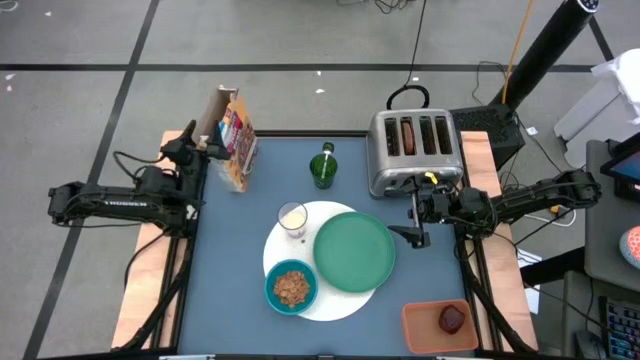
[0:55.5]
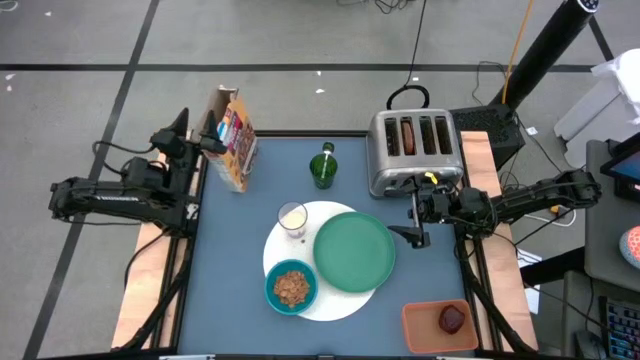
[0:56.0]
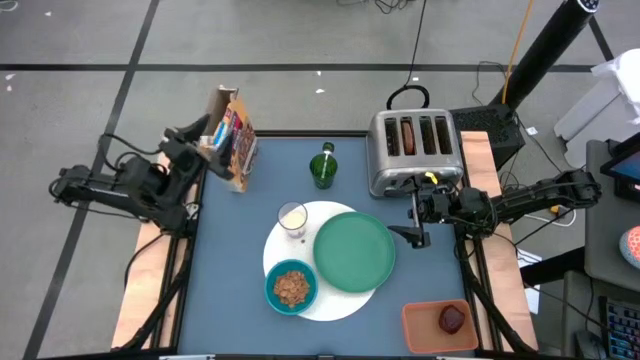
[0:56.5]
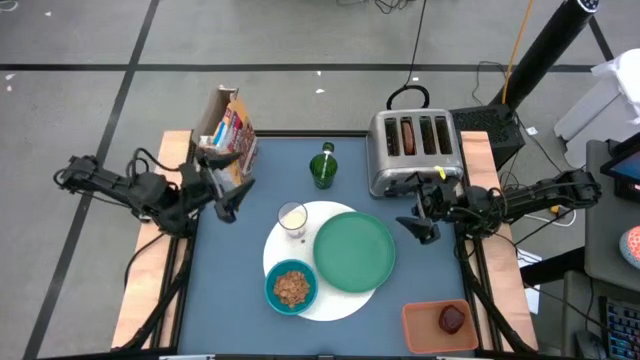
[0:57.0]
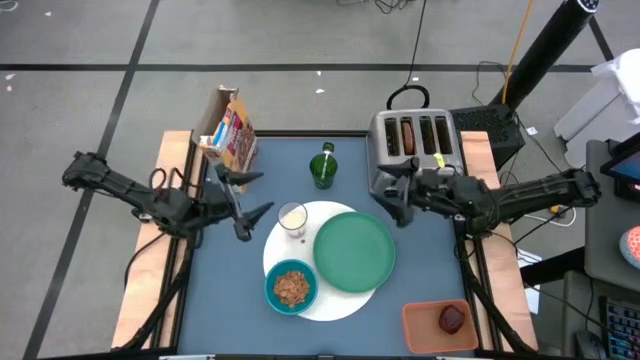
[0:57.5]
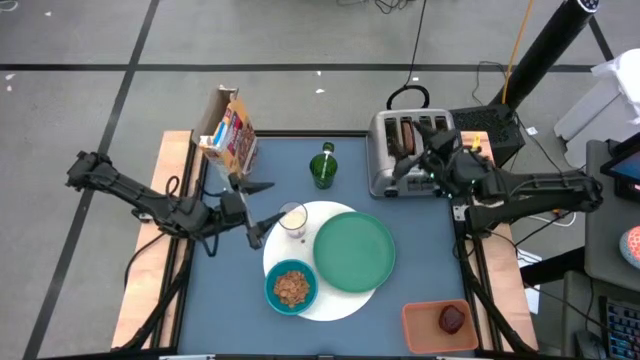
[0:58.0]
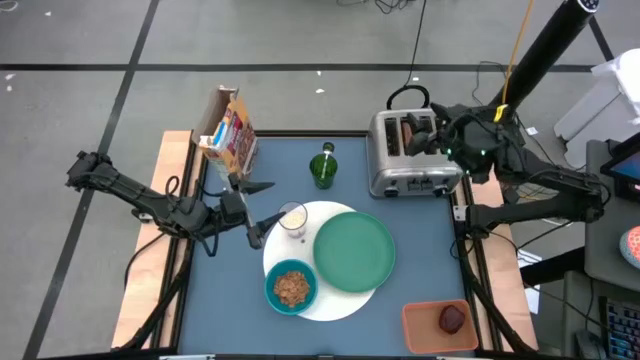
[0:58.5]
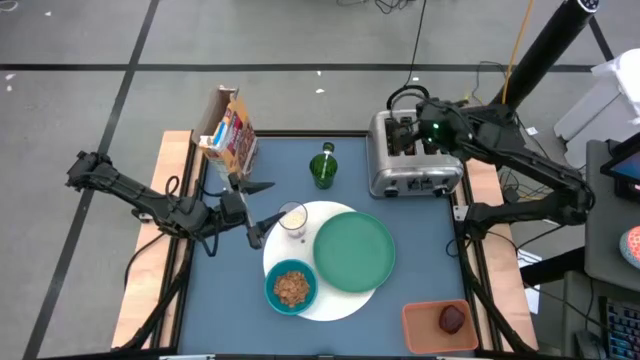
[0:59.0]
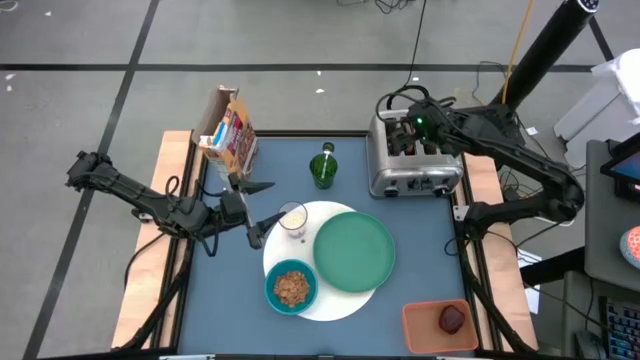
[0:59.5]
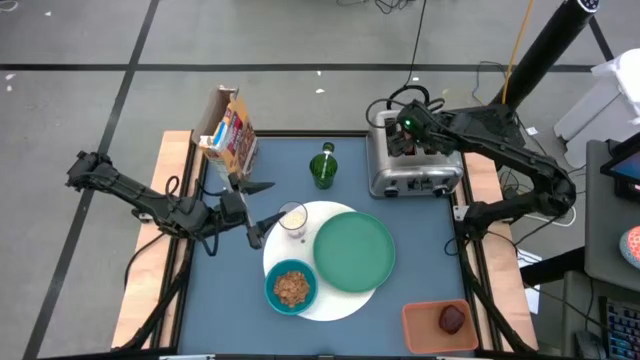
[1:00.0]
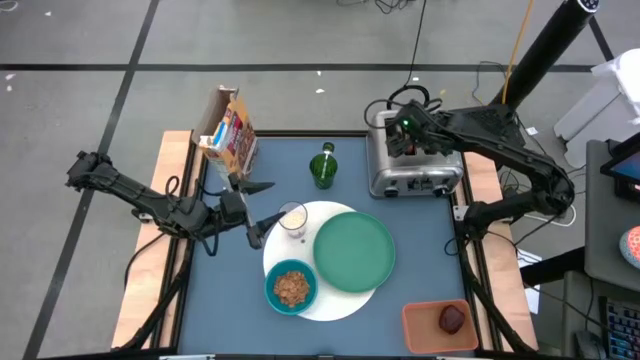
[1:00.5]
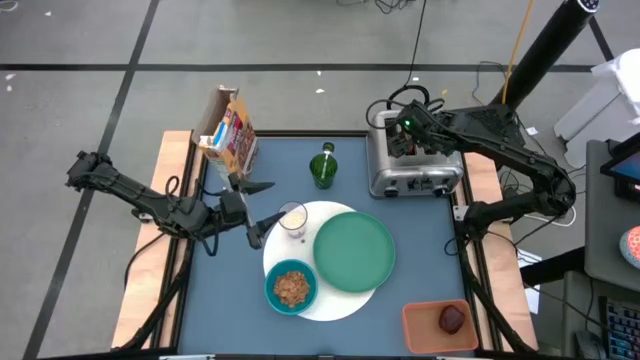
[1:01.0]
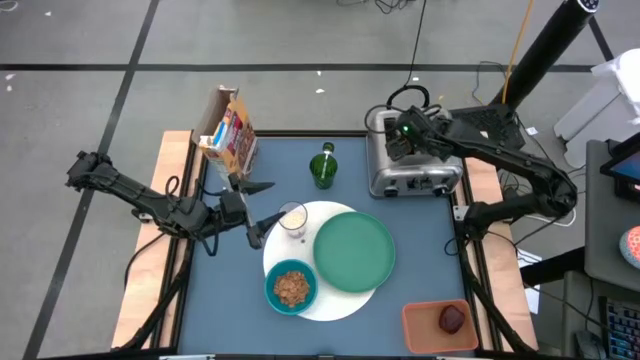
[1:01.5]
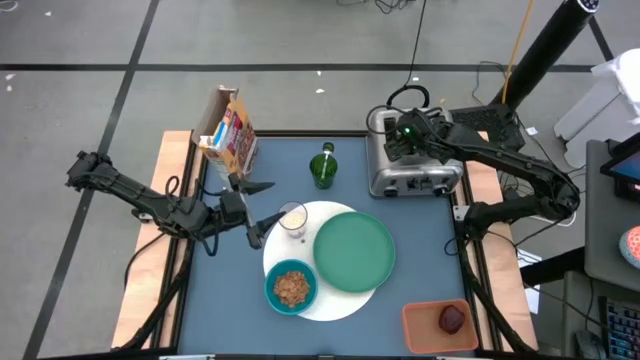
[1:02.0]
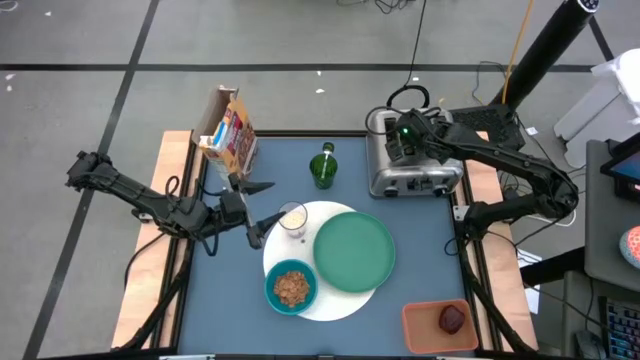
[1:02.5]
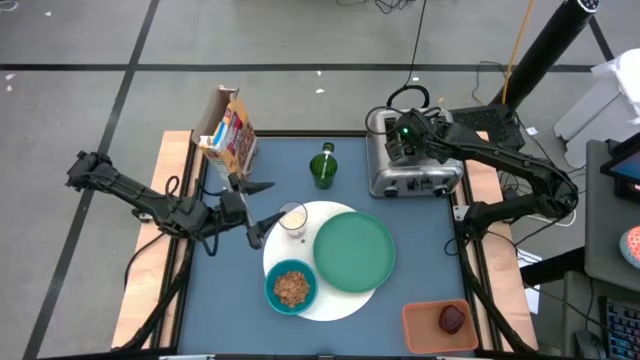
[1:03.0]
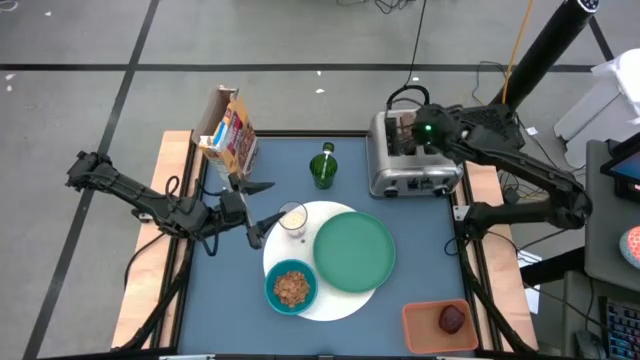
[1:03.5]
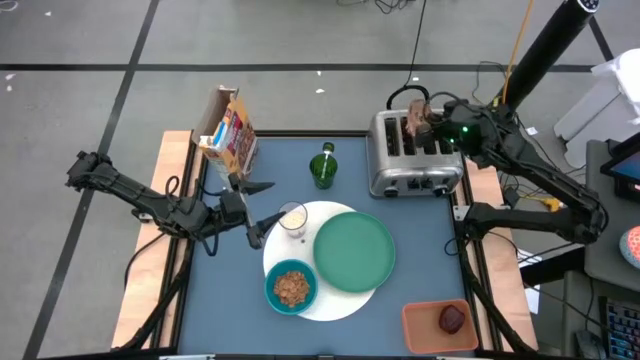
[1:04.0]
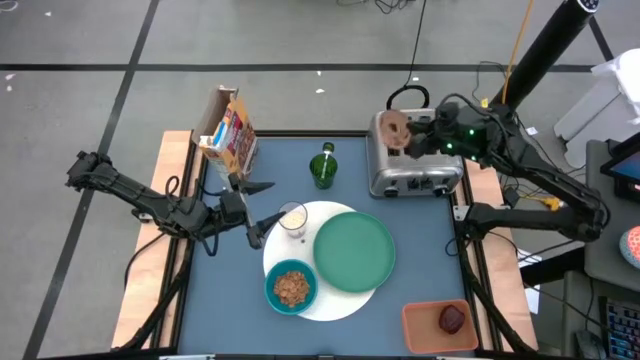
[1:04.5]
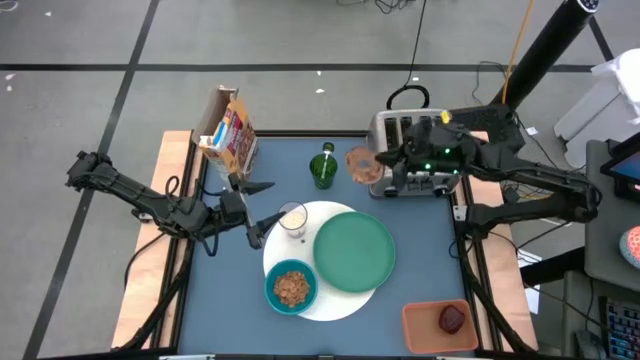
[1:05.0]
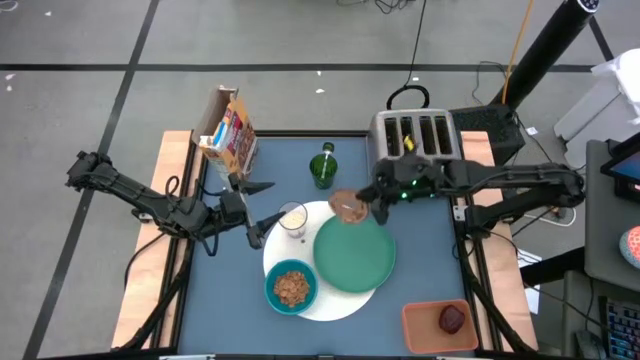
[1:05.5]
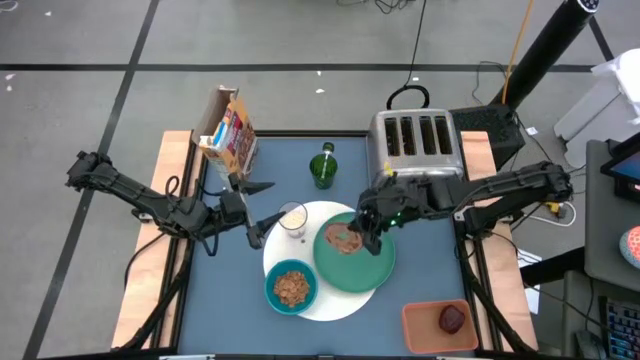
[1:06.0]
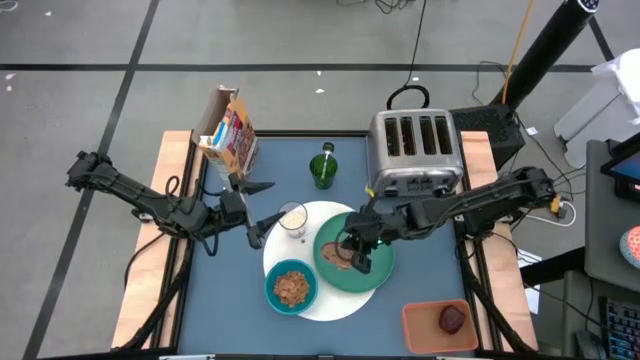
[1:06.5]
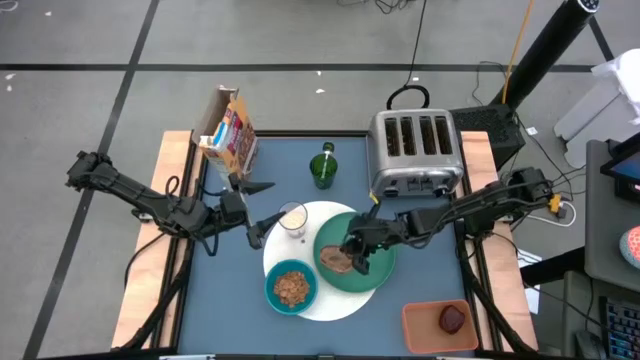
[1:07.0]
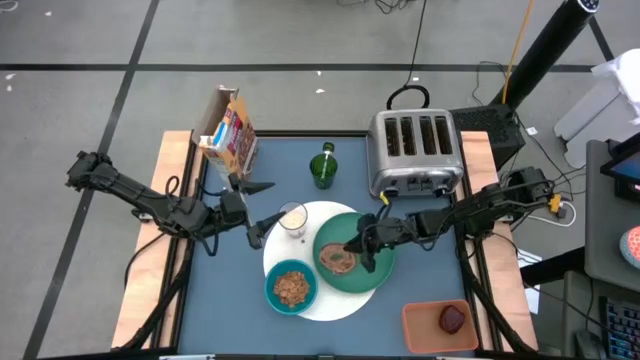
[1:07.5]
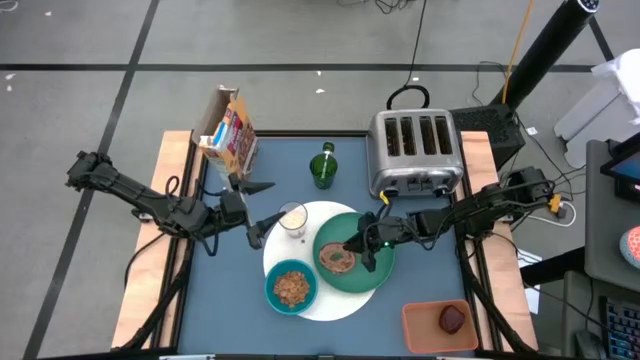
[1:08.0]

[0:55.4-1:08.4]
Task: Arrange a breakfast setting
Put the toasted bread from the toaster on the green plate

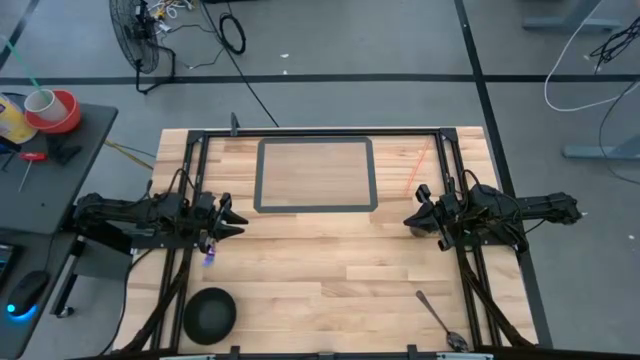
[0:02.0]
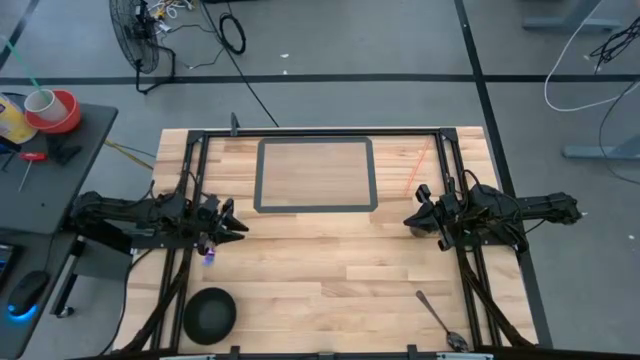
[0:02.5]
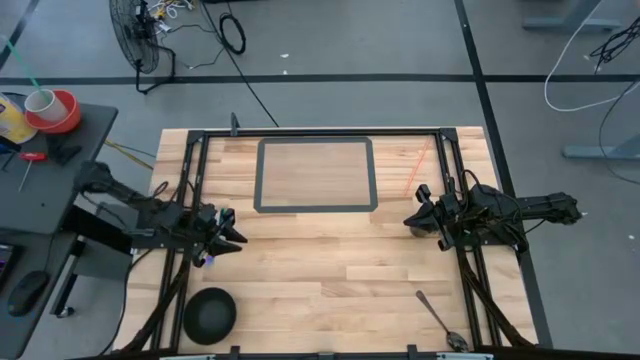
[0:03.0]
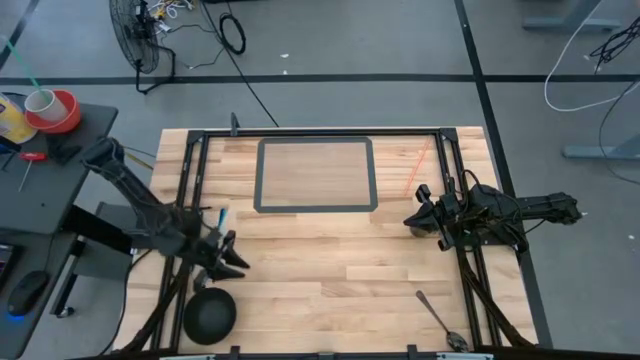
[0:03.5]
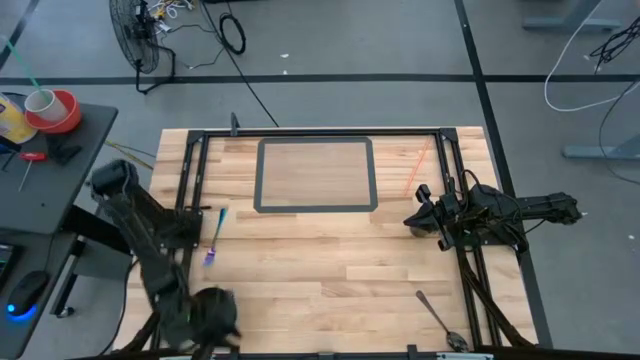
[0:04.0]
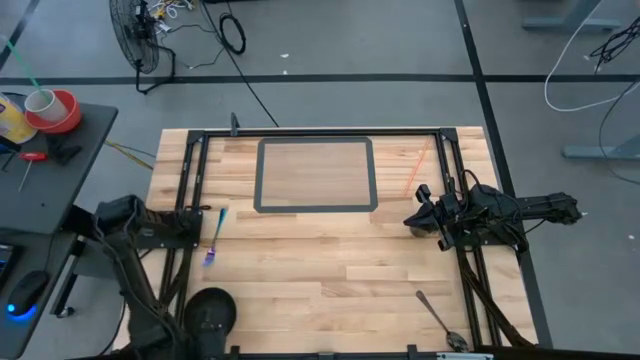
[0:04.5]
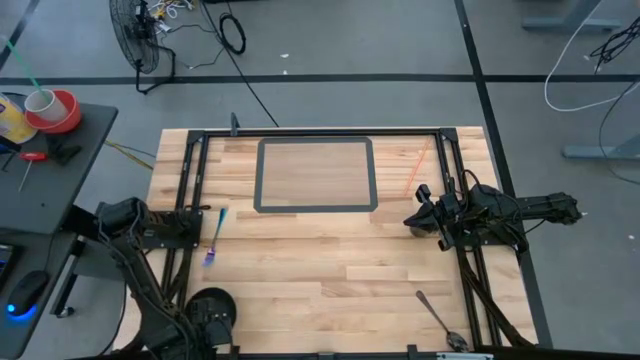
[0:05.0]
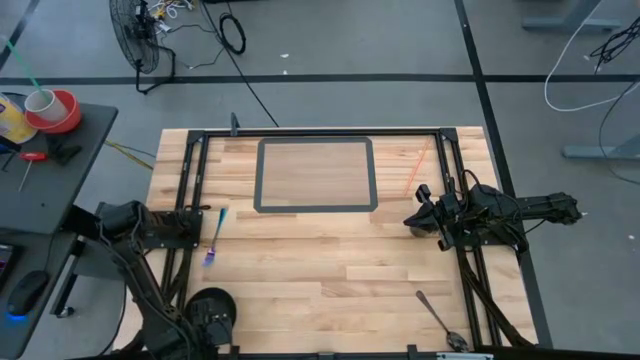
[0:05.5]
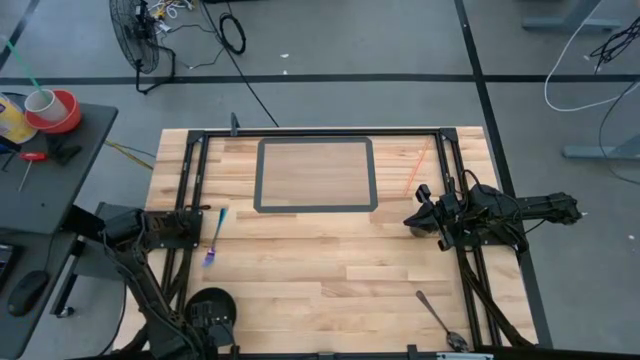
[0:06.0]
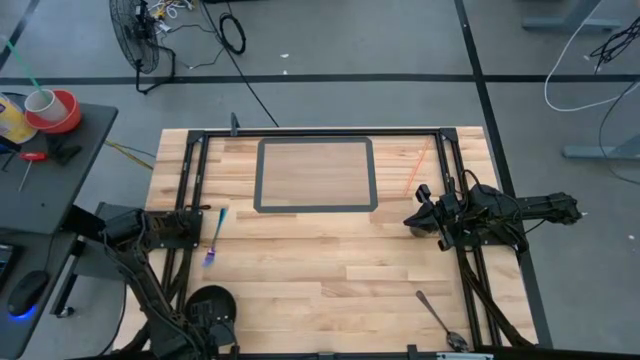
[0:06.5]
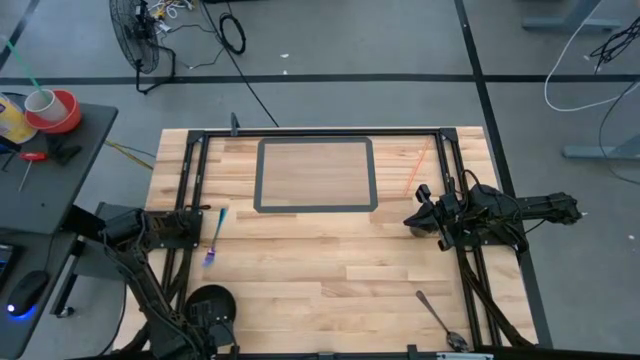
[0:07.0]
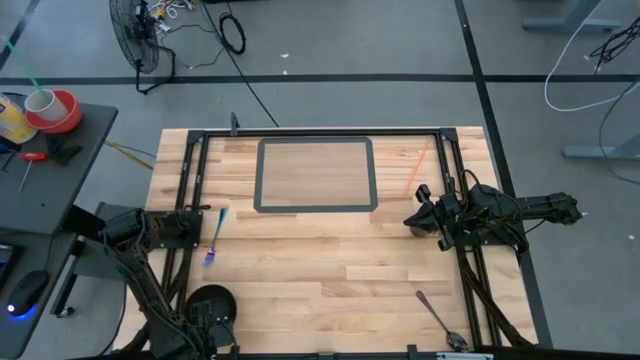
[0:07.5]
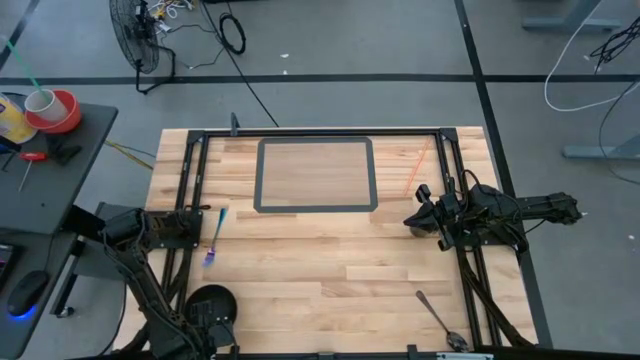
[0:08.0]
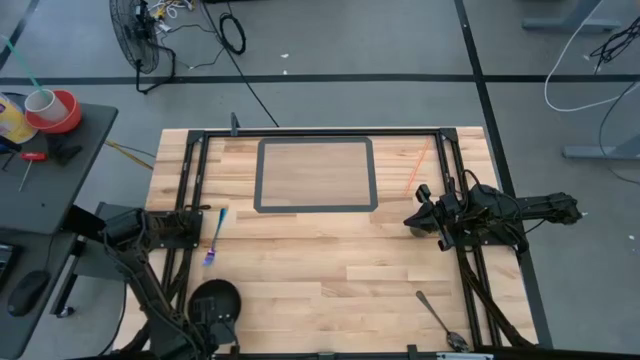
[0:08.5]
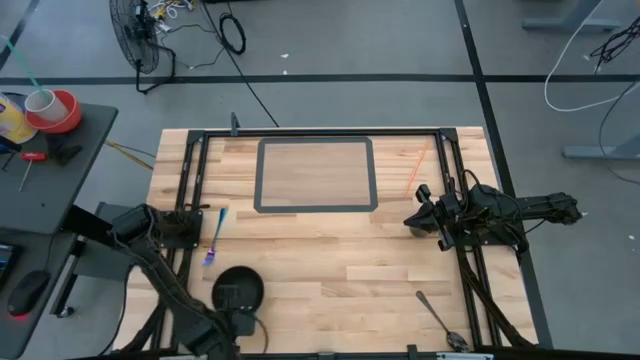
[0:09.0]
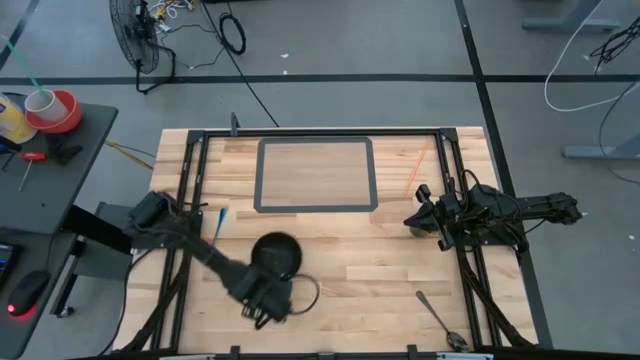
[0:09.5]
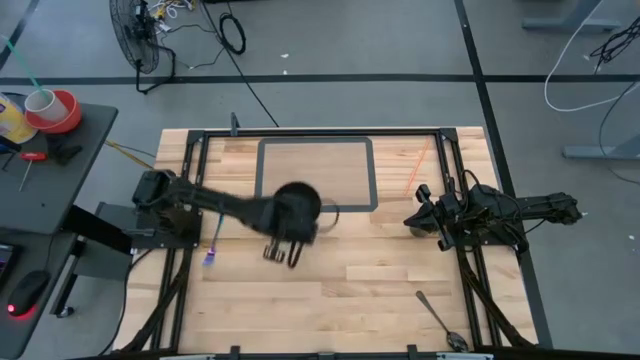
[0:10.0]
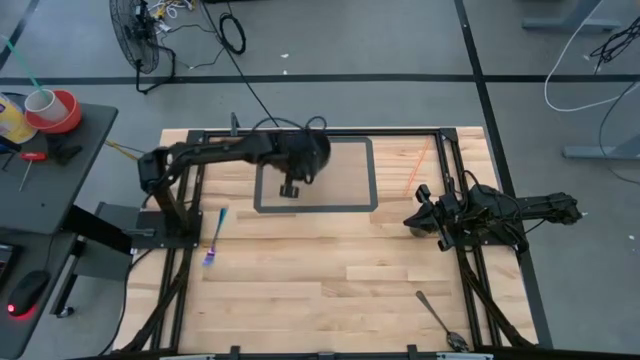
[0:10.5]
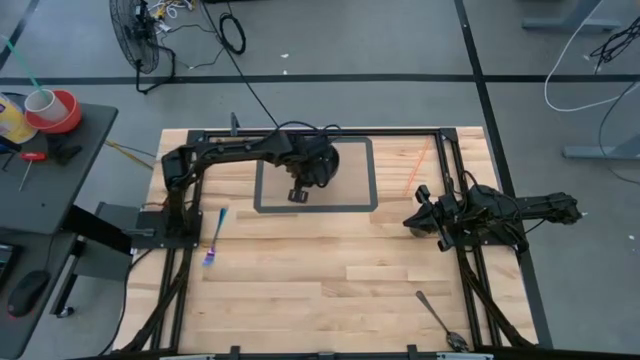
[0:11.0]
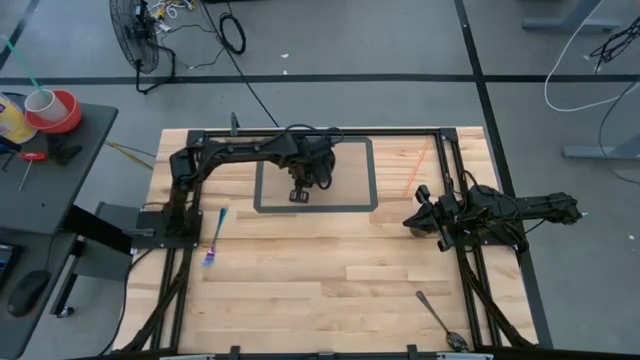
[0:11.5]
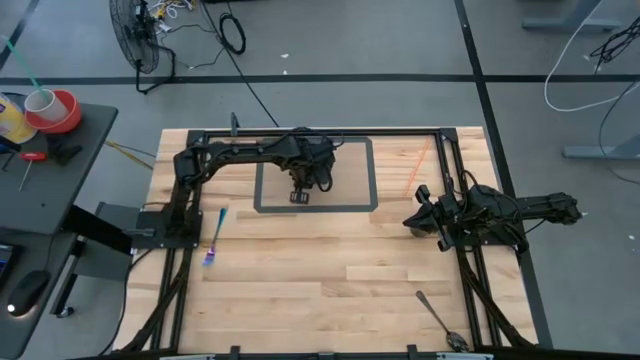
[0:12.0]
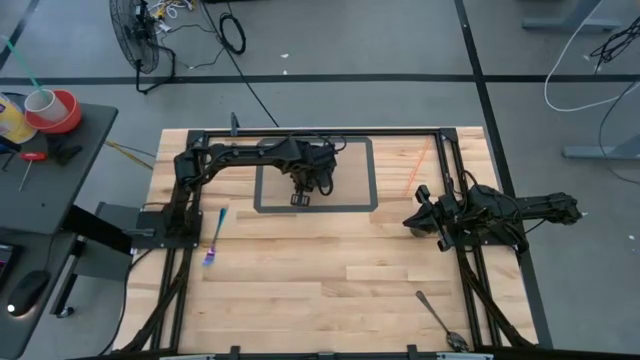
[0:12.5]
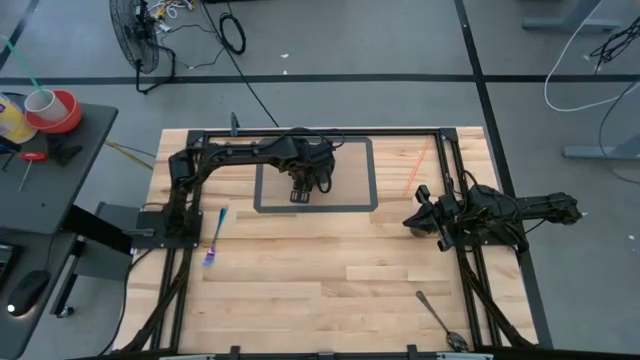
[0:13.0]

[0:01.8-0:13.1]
Task: Pick & Place Utensil
Put the black bowl on the transparent mat
